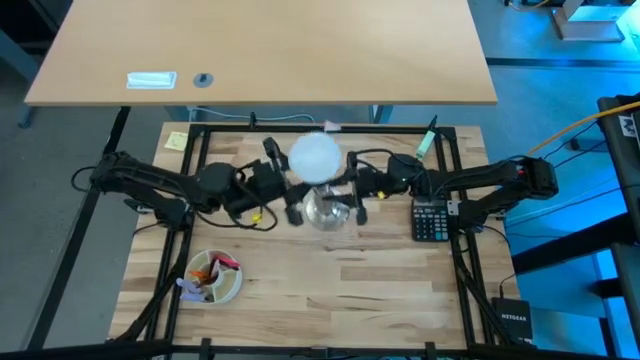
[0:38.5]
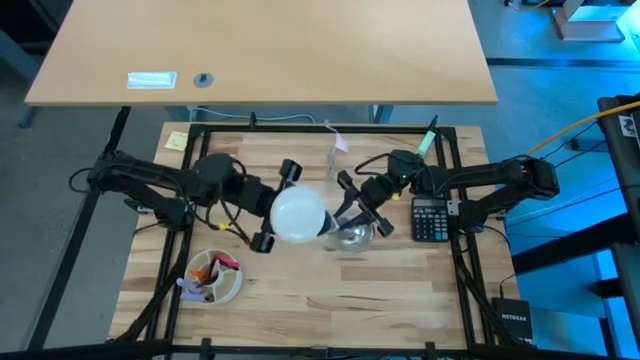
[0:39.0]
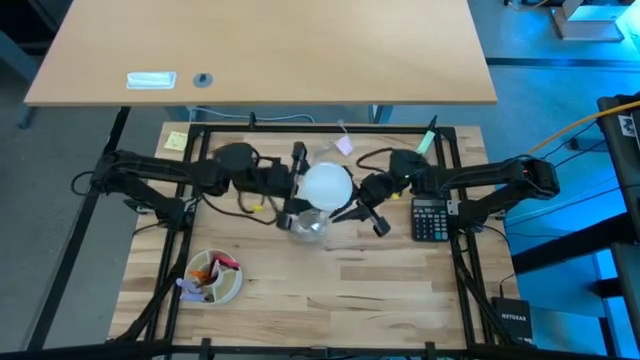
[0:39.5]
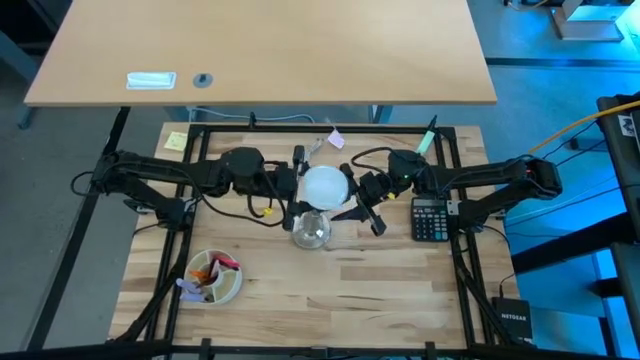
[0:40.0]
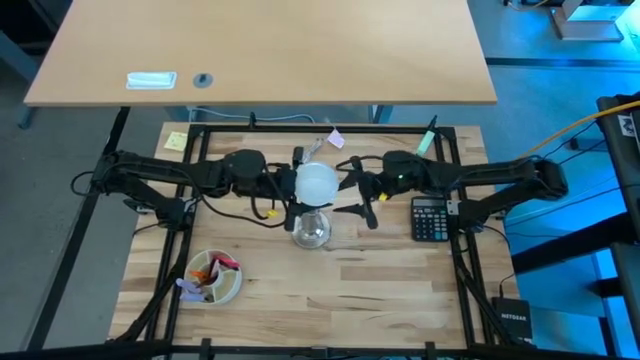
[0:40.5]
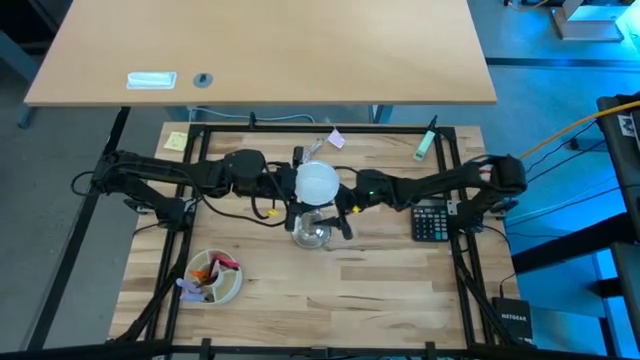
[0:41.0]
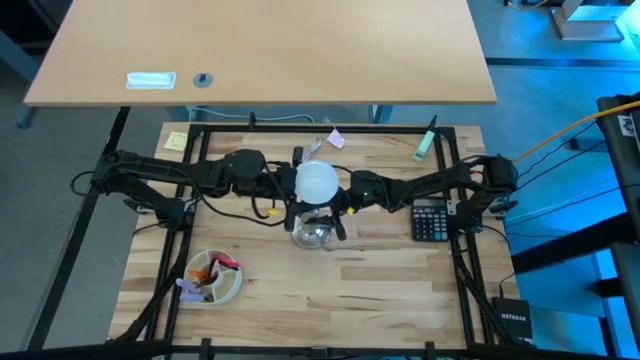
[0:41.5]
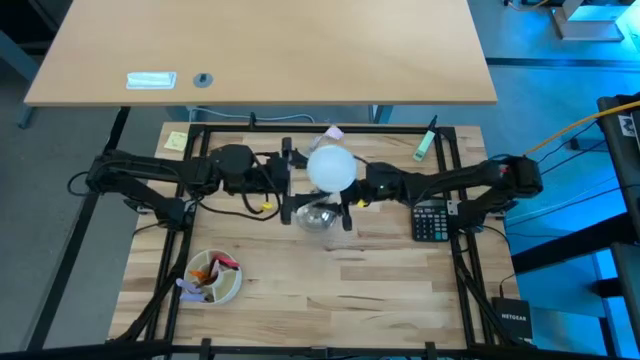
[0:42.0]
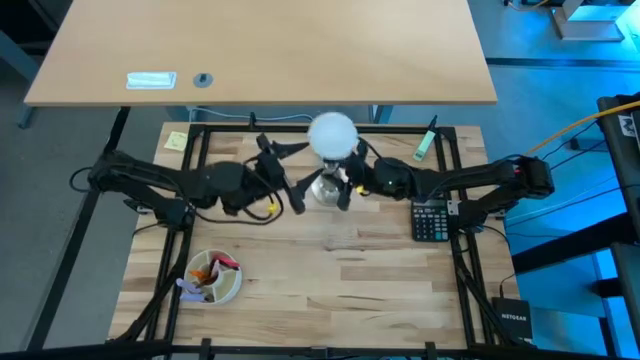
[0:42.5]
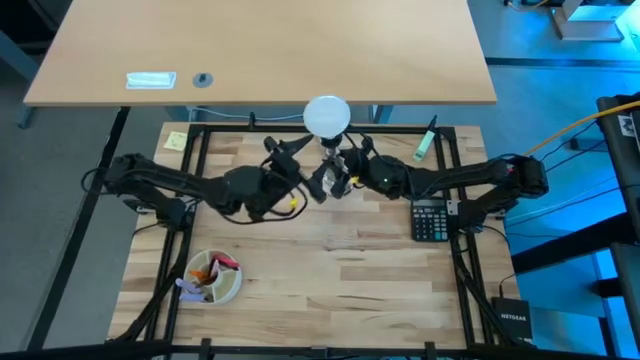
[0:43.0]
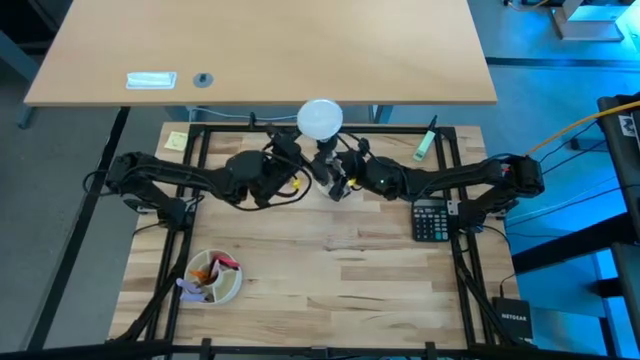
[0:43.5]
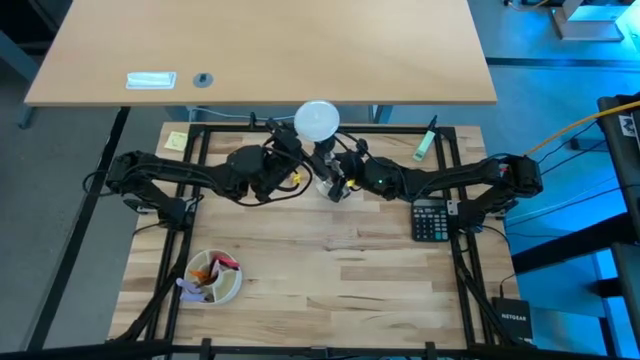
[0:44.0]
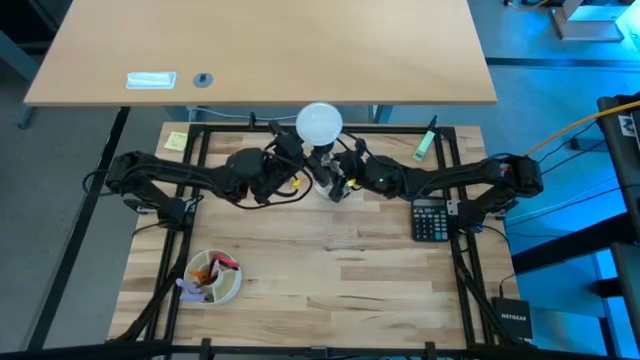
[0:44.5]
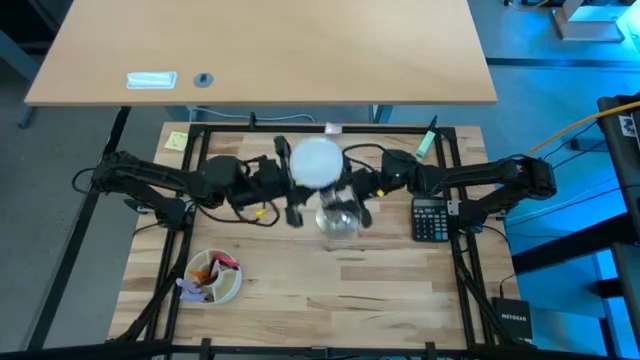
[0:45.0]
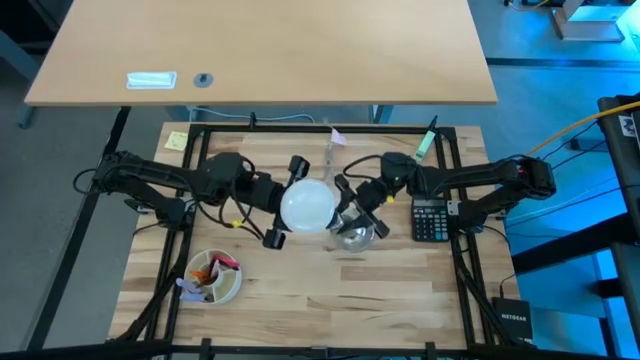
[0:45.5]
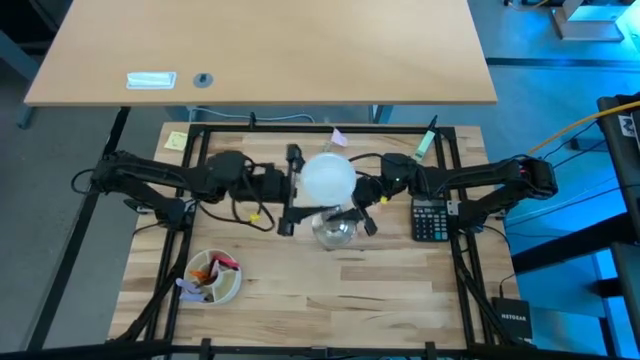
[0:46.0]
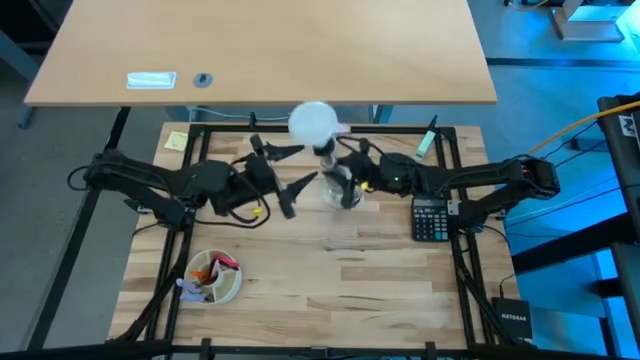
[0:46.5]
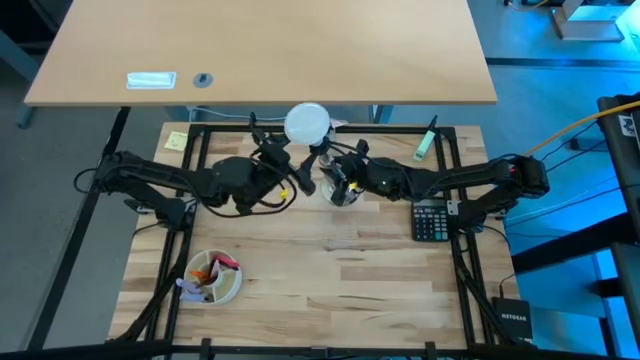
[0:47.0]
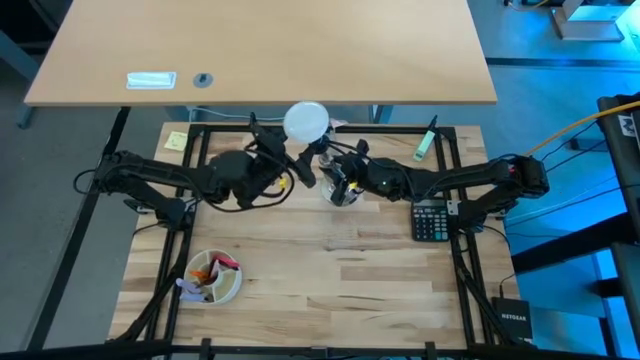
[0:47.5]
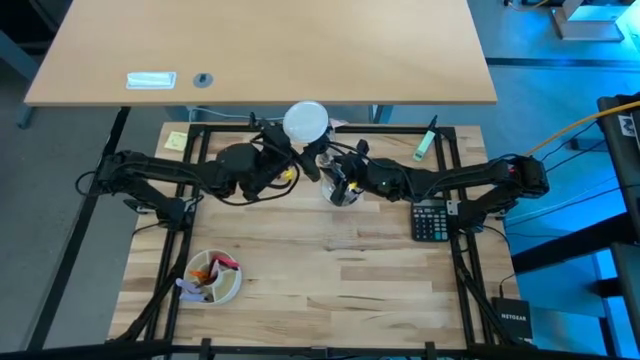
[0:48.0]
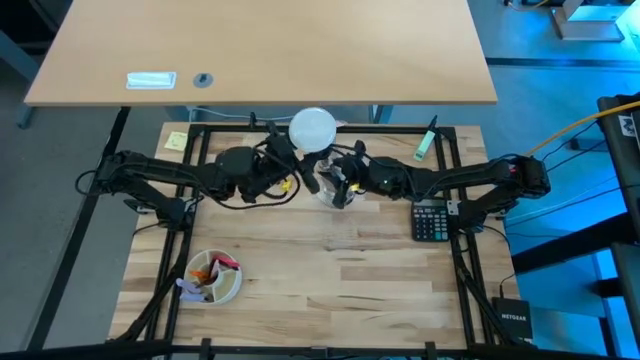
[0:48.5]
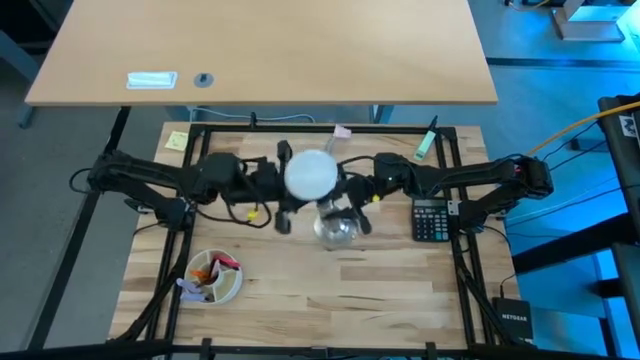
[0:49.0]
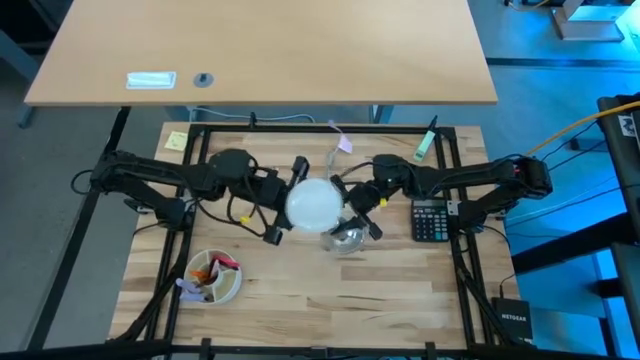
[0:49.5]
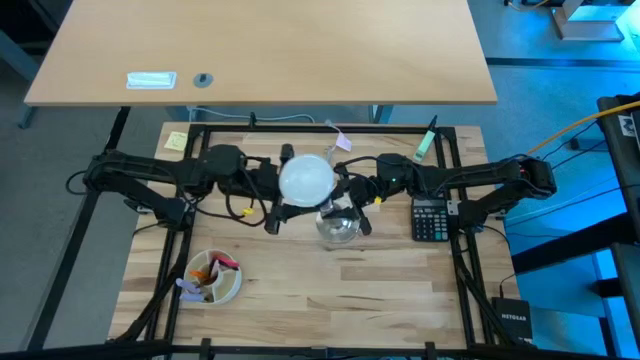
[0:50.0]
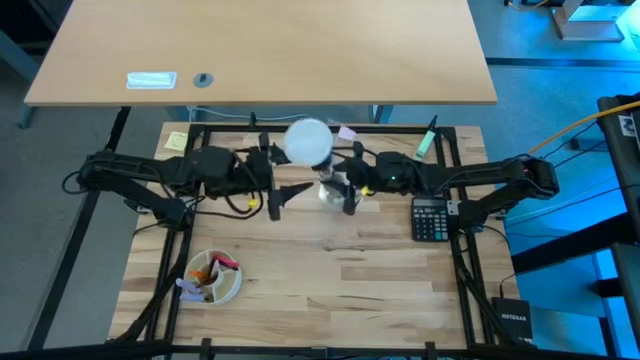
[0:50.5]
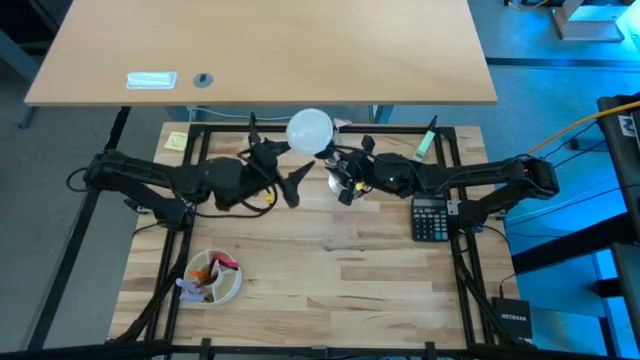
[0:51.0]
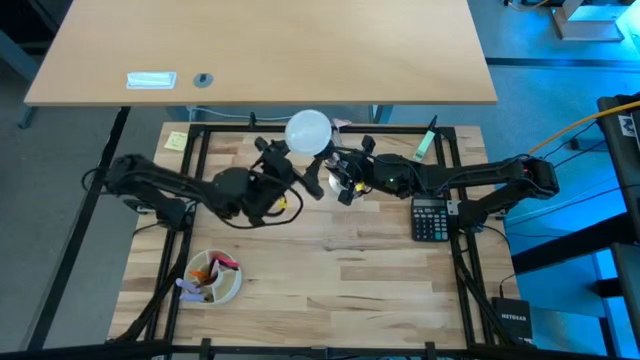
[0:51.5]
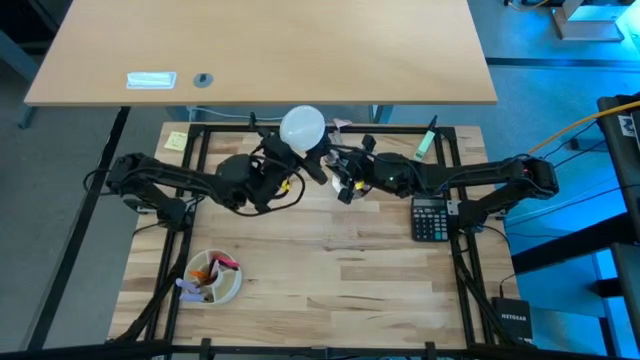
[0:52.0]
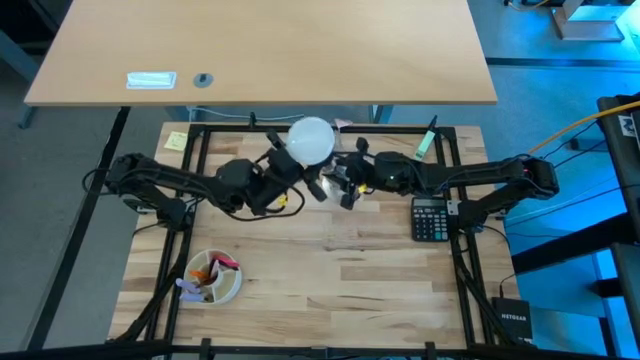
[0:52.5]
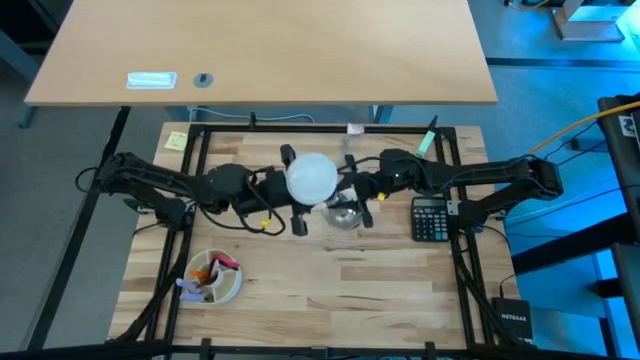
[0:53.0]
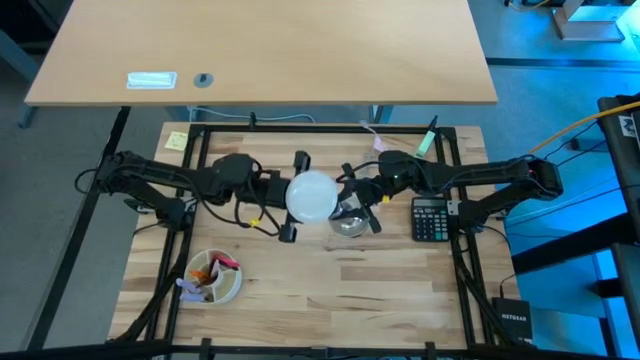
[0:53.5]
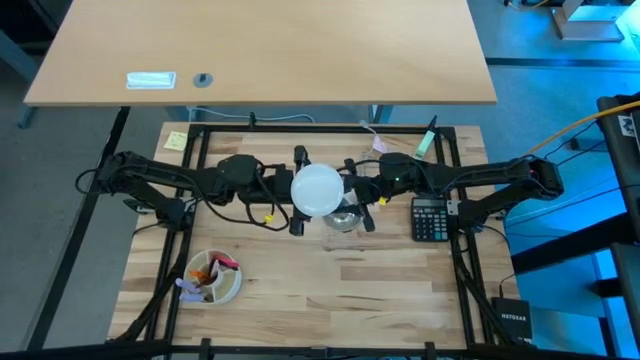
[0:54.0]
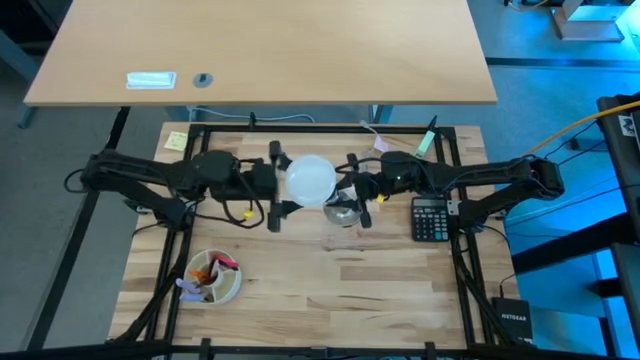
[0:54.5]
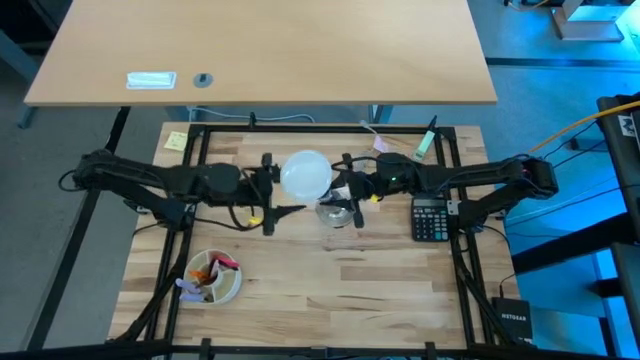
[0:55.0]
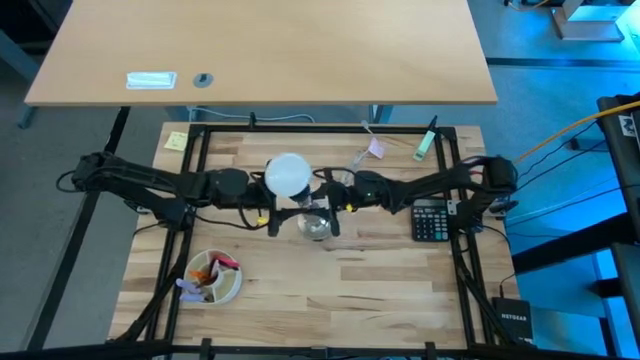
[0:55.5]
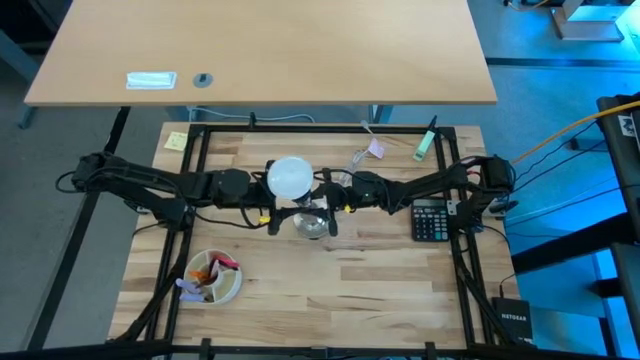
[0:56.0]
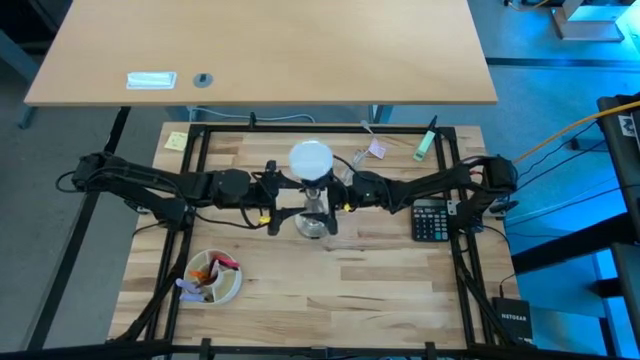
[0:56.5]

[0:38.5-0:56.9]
Task: Screw lightbulb
Insert the lightbulb into the silver lamp

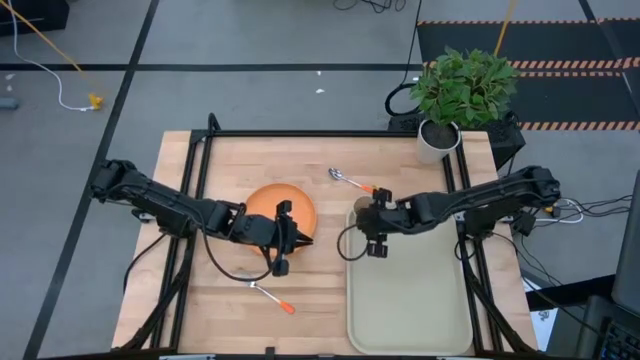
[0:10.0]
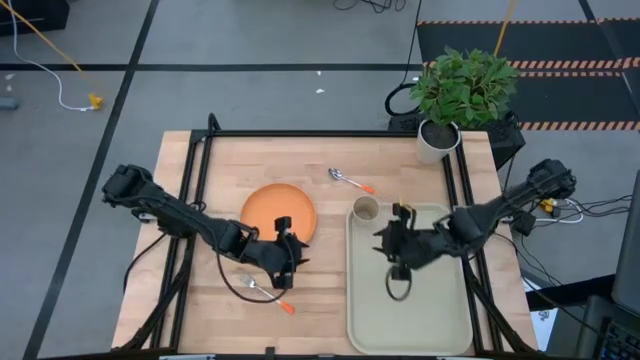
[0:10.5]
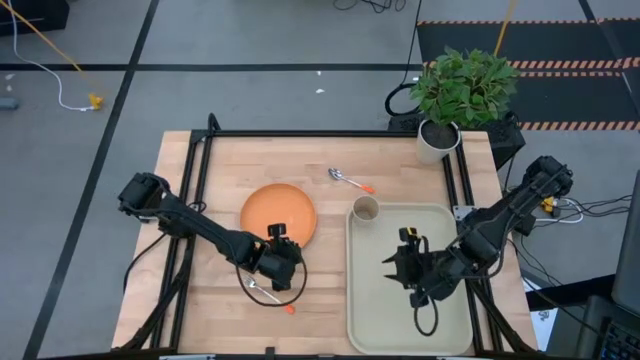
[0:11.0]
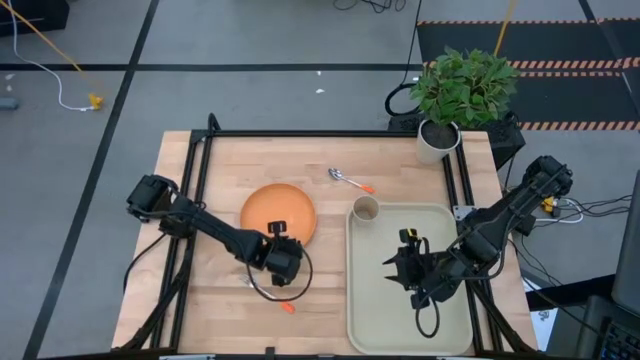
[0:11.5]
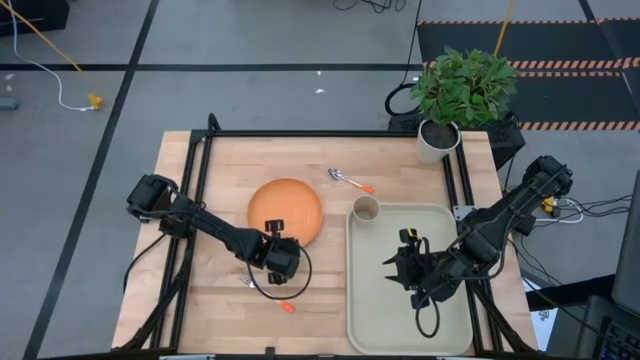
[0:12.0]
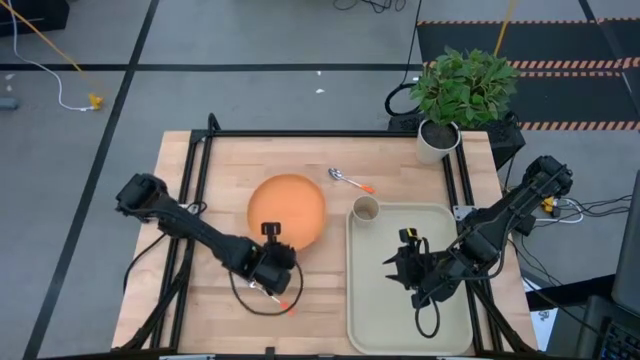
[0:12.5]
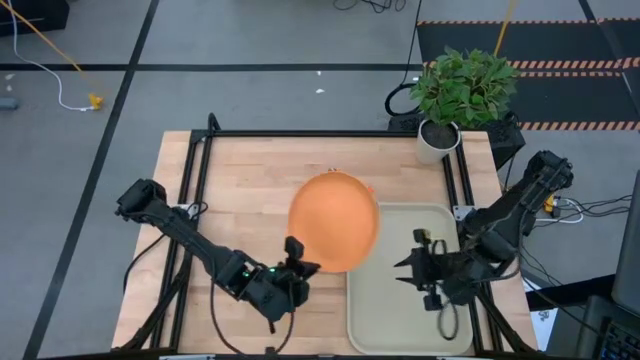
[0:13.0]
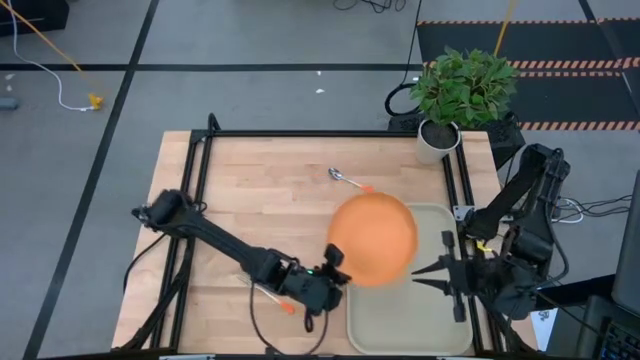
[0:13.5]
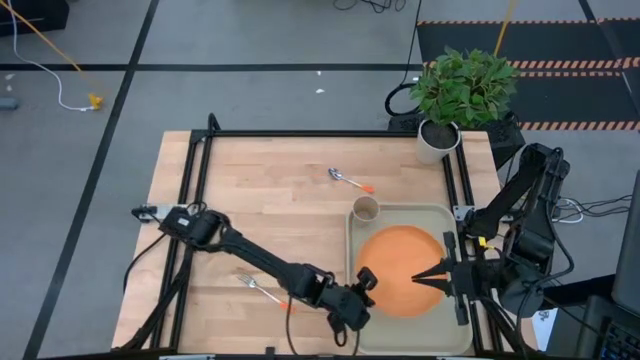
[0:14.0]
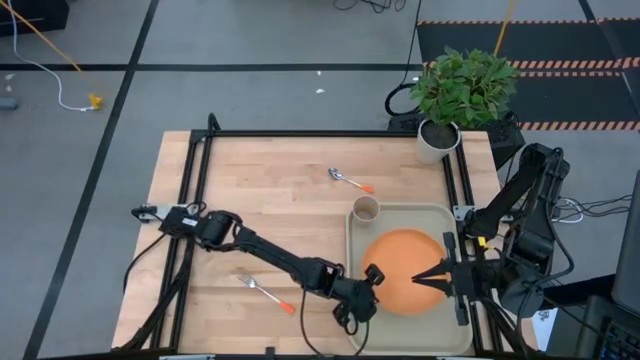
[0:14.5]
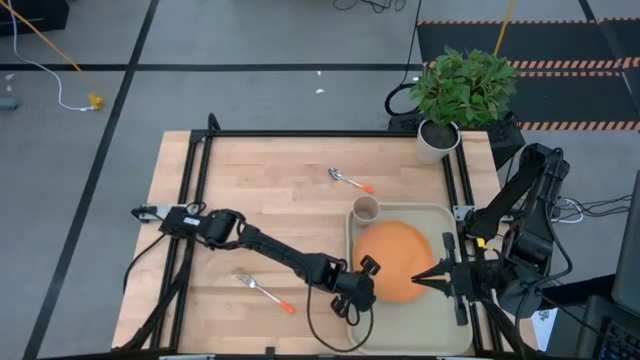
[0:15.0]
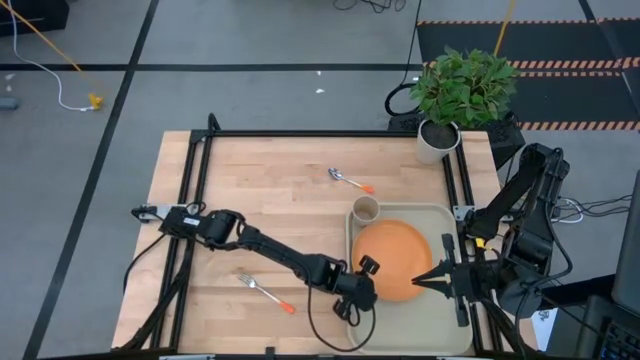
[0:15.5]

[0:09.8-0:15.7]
Task: Pick and place plate/cup/fork/spoon on tray
Put the orange plate on the bottom left of the light brown cup
